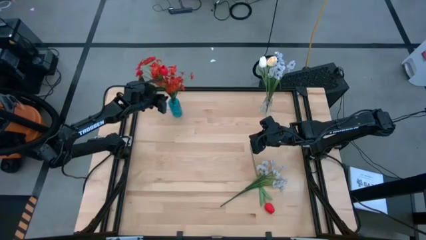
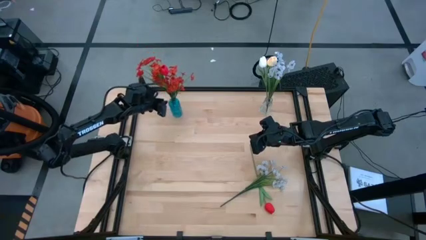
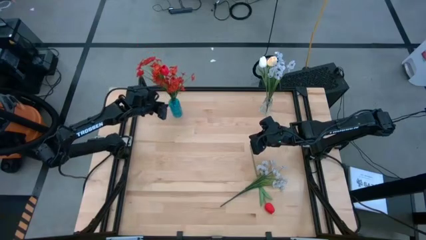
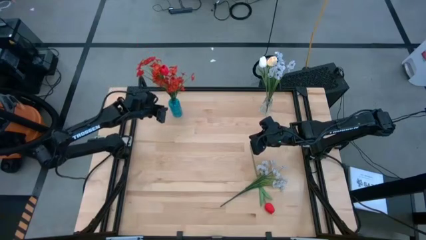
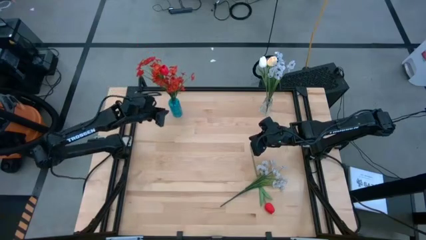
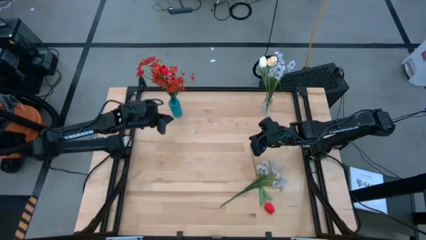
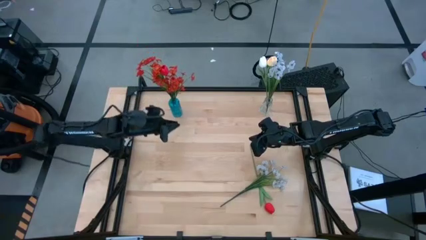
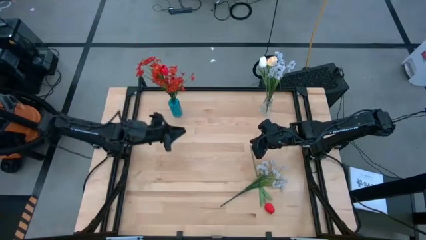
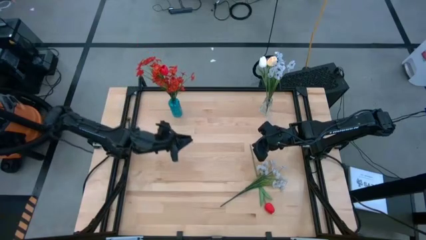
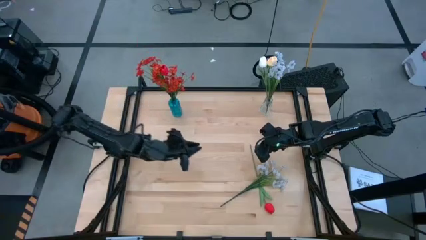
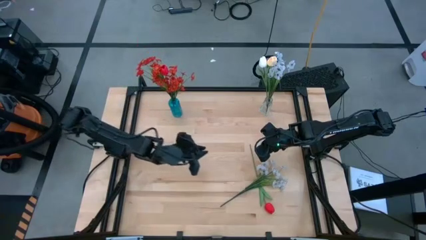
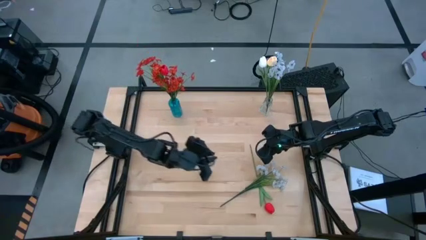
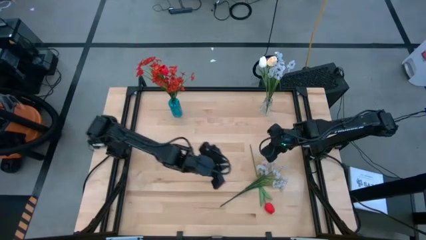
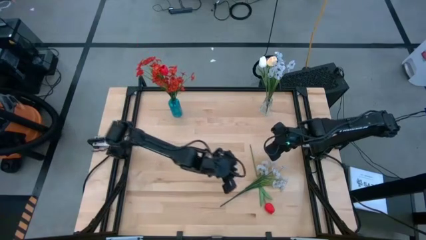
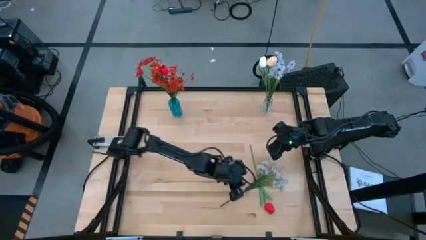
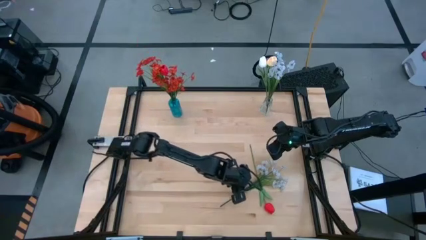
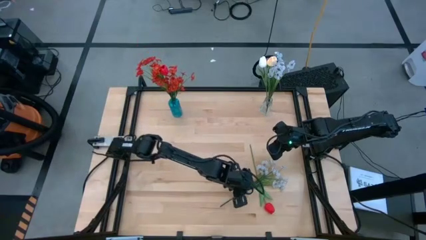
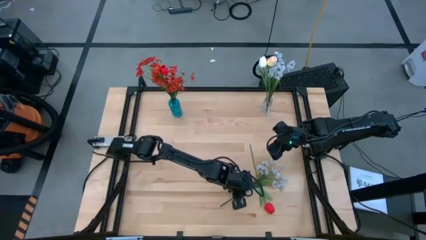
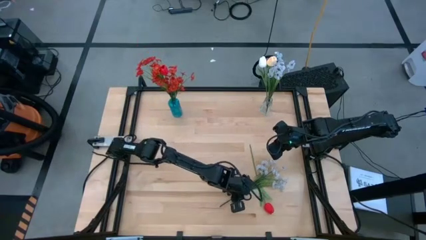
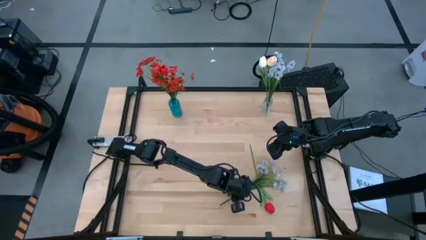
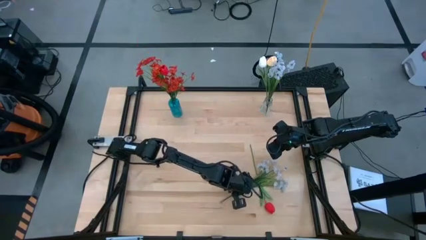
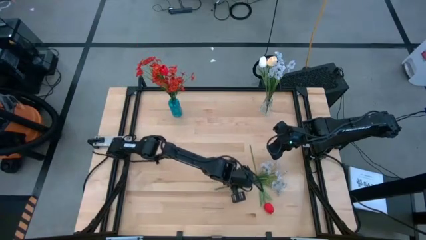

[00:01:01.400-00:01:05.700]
Task: Sort flowers into vase by color
Put the white flowers into the transparent vase

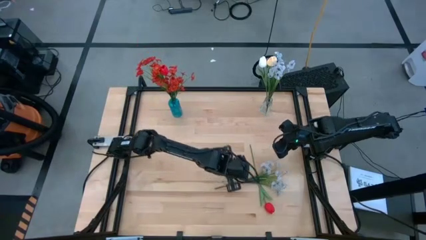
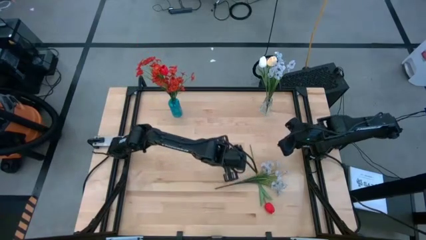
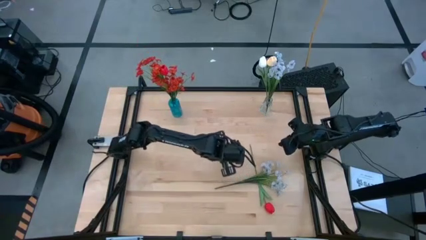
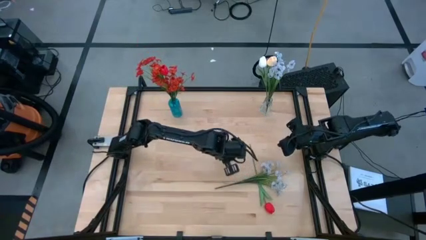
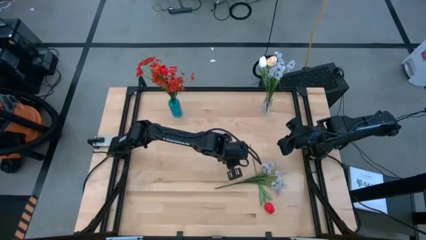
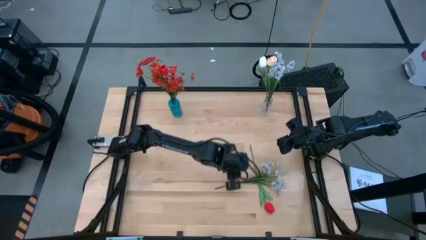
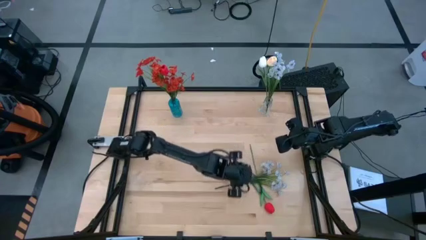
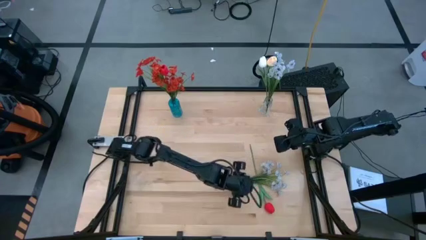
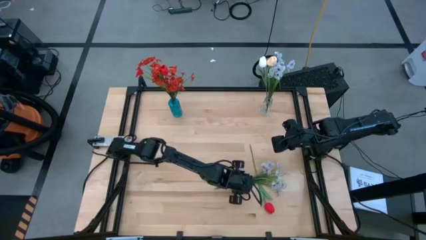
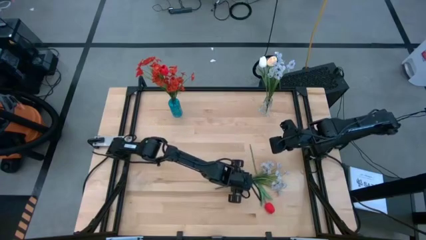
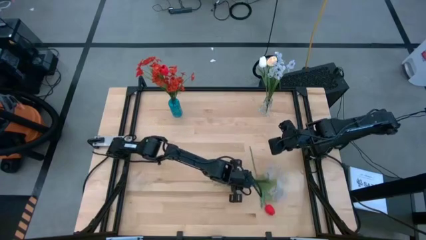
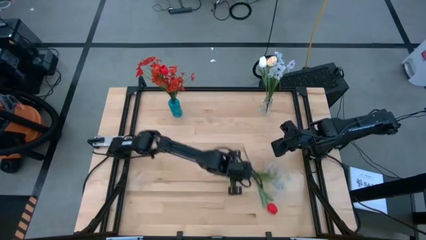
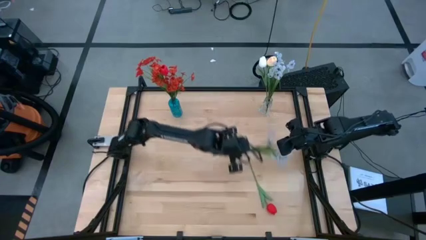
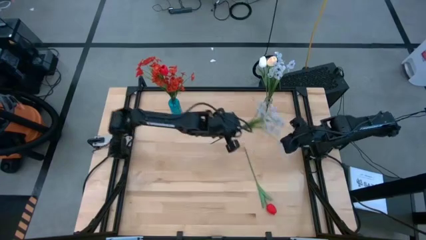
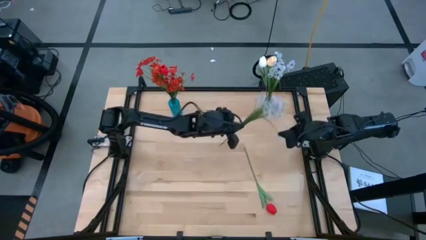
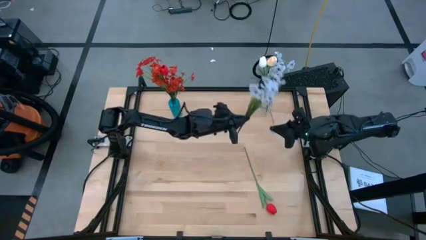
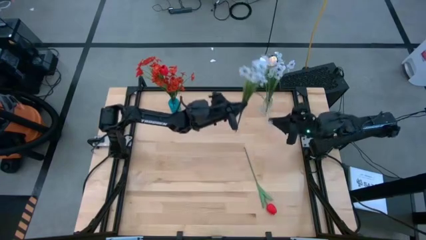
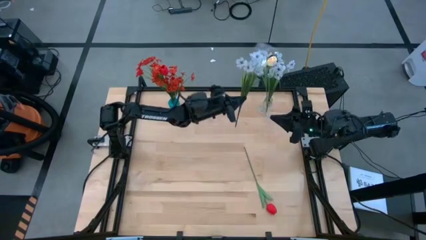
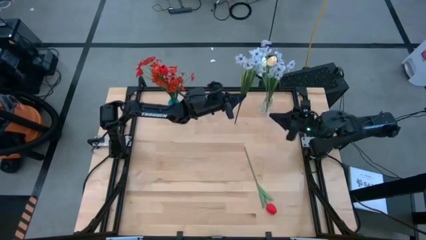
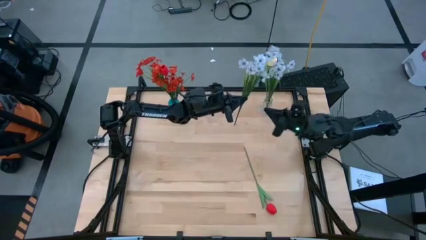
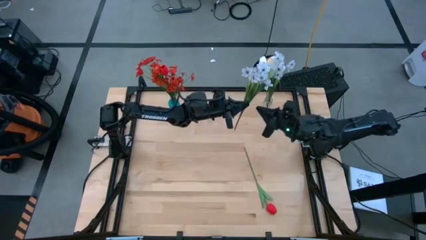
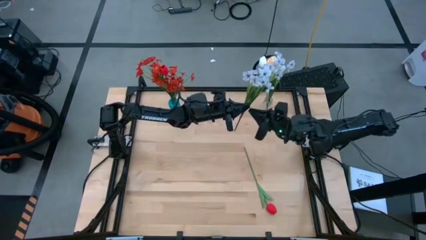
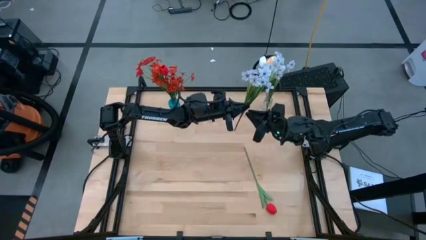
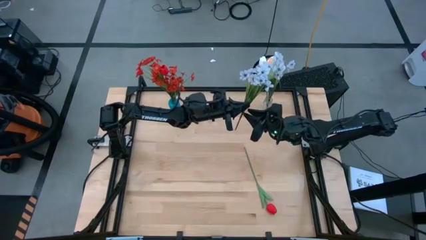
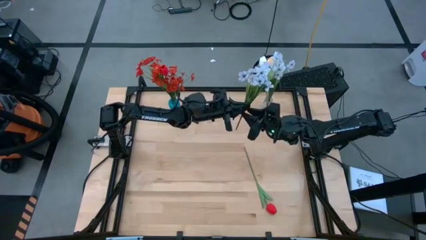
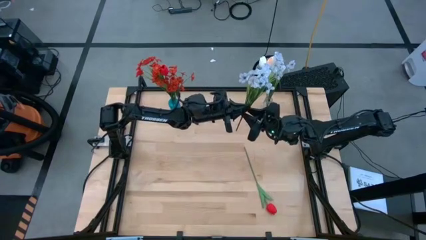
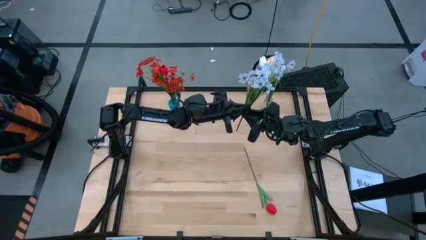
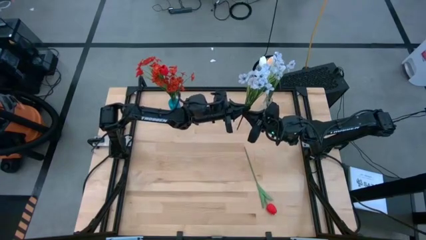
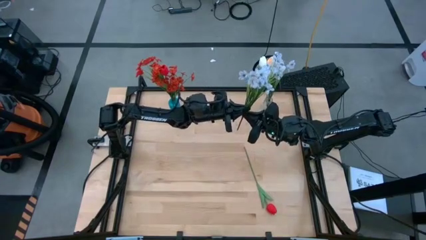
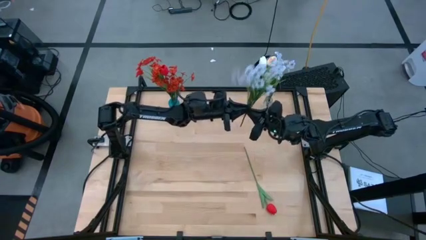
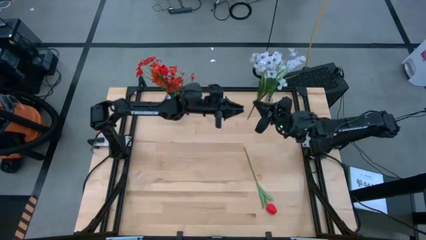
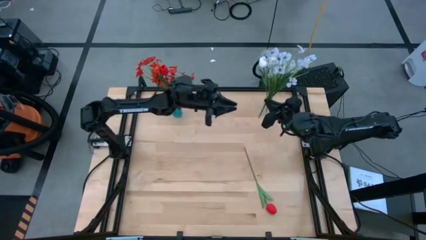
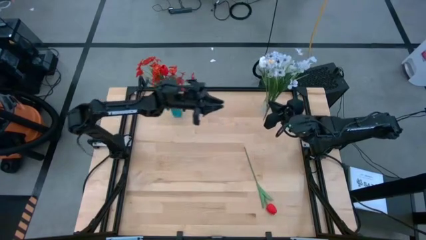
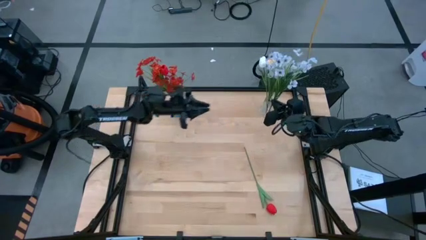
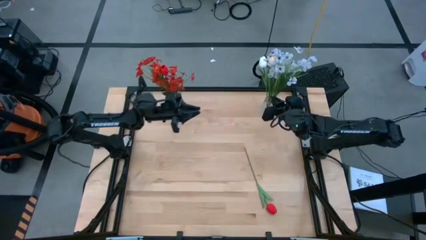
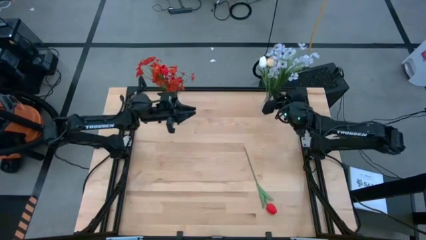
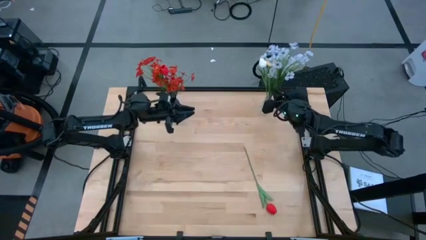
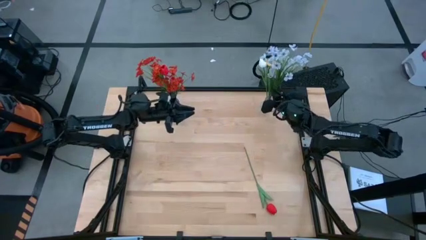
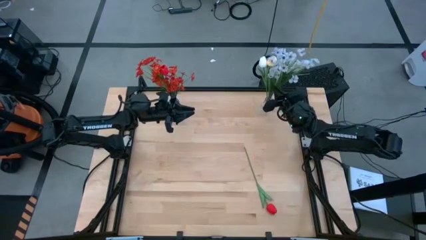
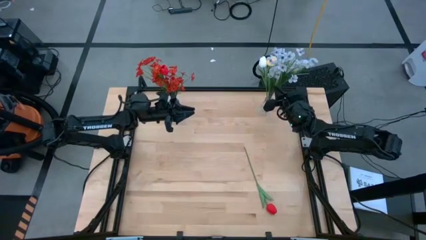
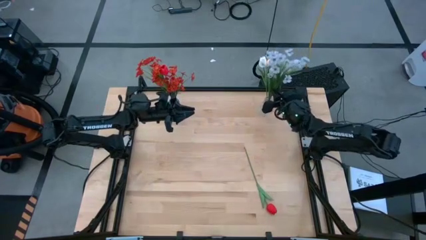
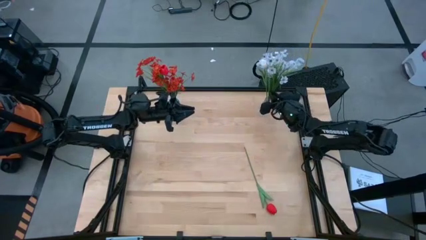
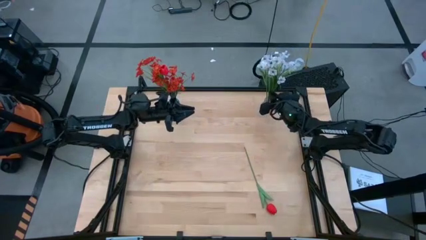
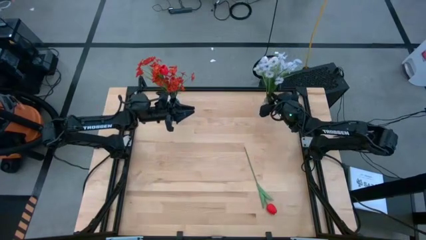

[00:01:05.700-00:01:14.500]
Put the white flowers into the transparent vase
